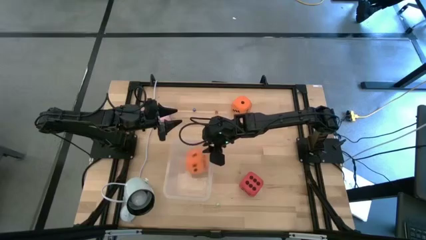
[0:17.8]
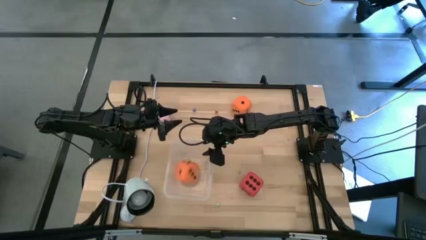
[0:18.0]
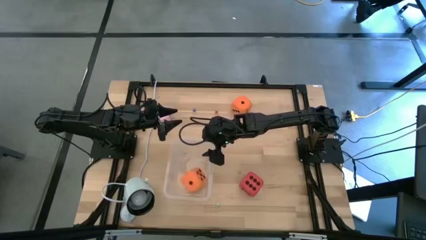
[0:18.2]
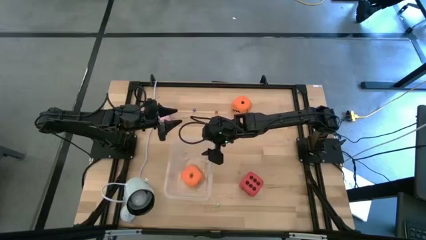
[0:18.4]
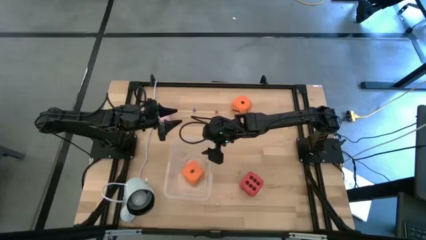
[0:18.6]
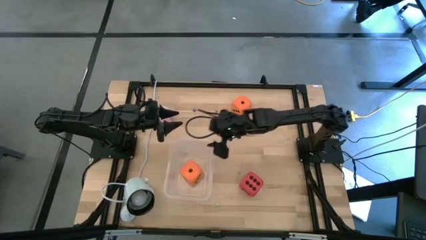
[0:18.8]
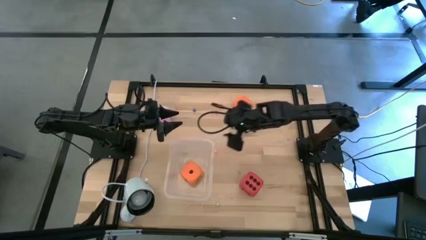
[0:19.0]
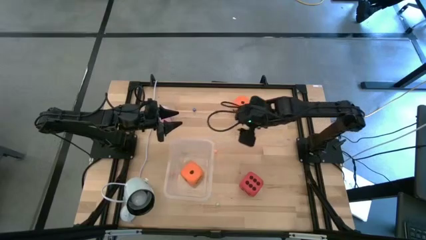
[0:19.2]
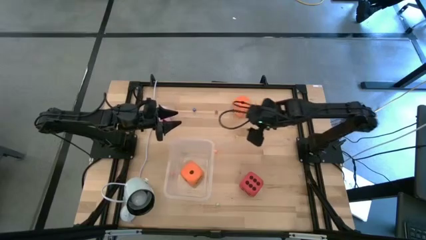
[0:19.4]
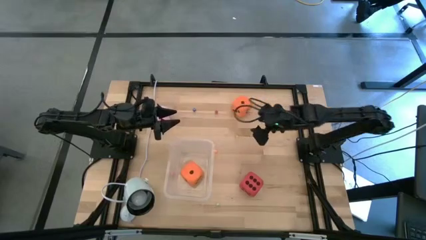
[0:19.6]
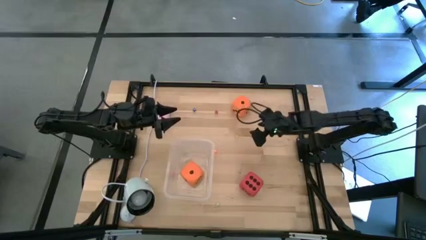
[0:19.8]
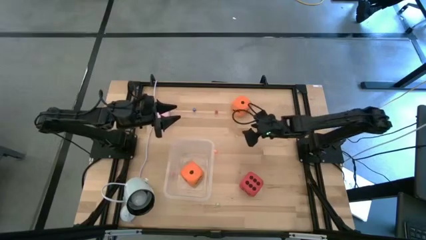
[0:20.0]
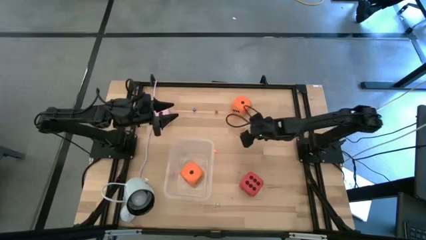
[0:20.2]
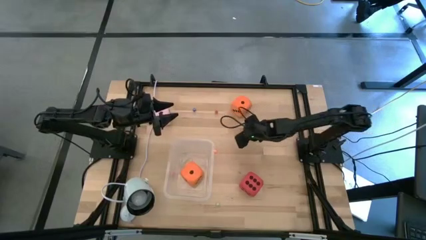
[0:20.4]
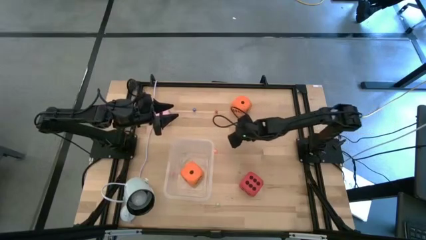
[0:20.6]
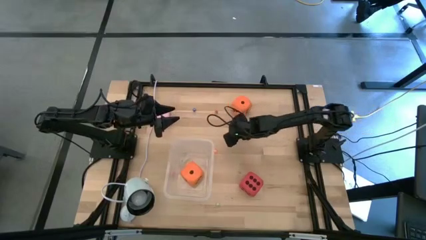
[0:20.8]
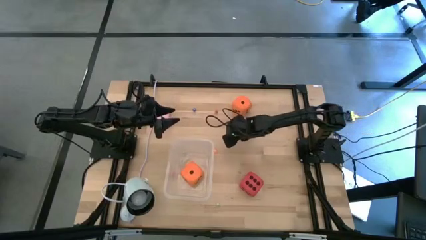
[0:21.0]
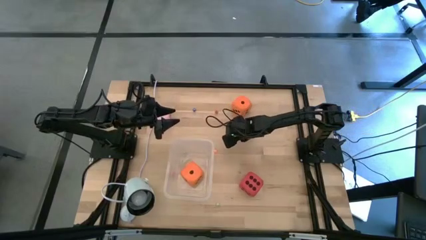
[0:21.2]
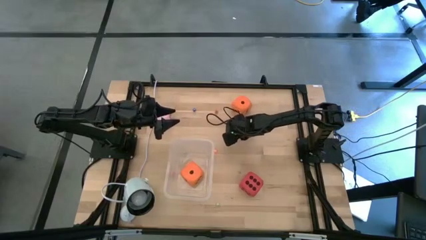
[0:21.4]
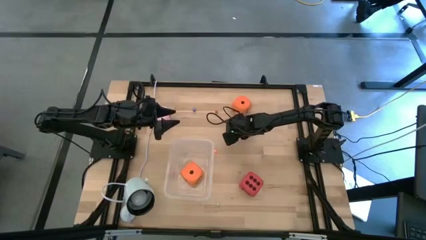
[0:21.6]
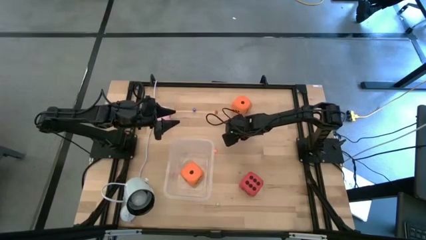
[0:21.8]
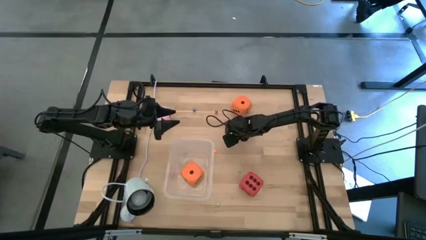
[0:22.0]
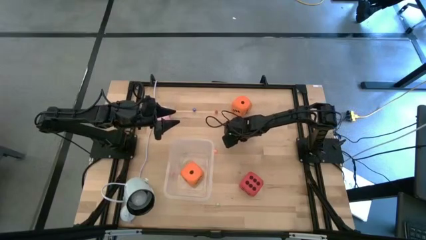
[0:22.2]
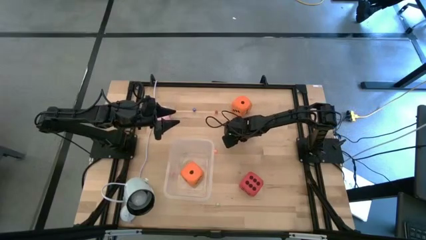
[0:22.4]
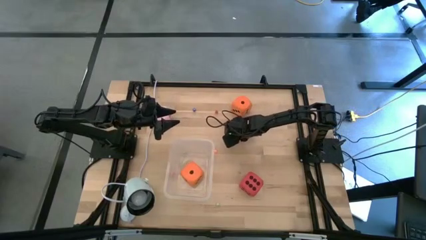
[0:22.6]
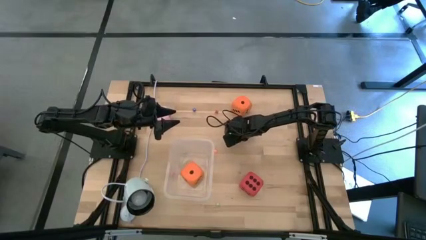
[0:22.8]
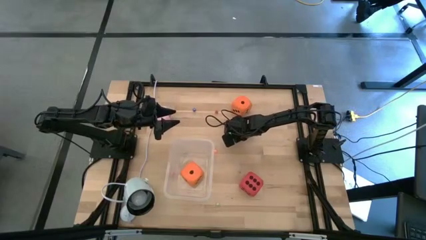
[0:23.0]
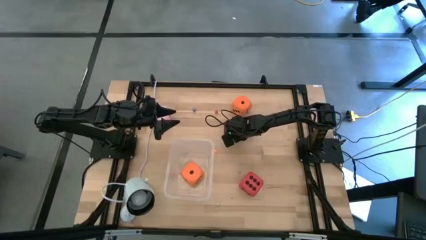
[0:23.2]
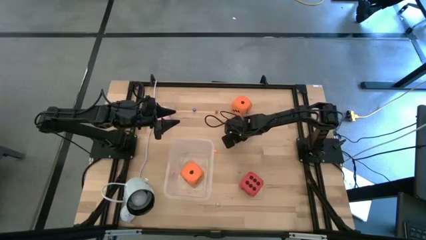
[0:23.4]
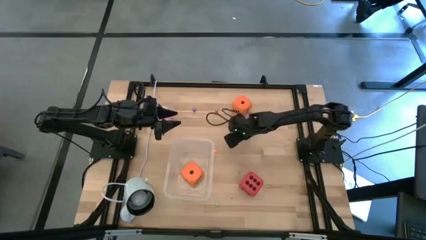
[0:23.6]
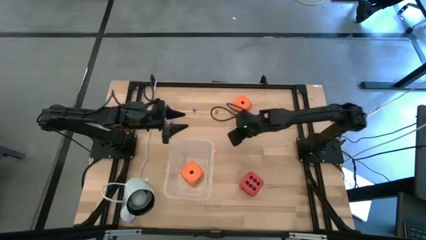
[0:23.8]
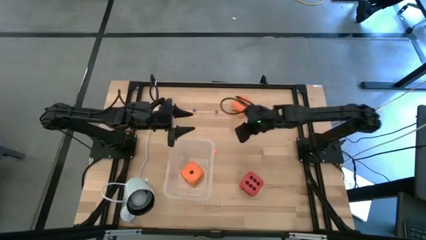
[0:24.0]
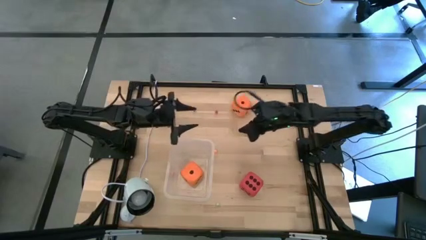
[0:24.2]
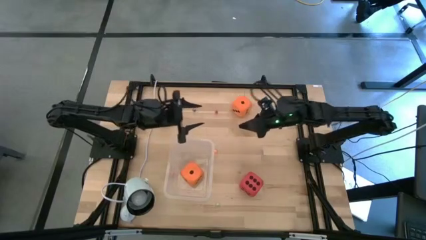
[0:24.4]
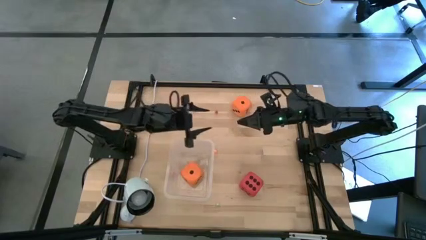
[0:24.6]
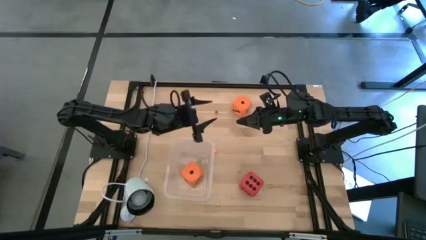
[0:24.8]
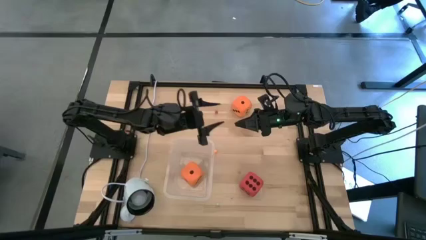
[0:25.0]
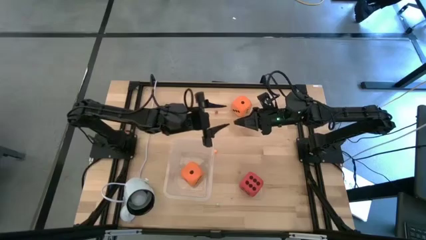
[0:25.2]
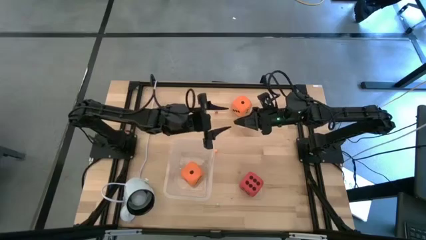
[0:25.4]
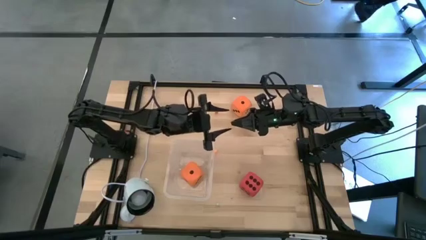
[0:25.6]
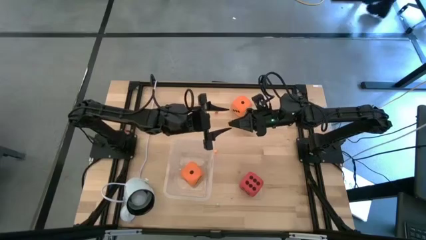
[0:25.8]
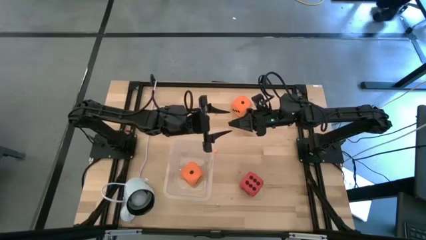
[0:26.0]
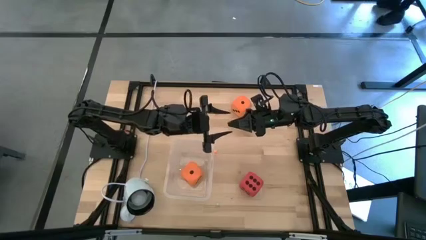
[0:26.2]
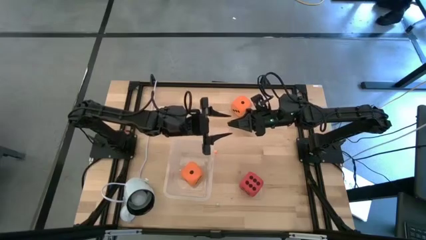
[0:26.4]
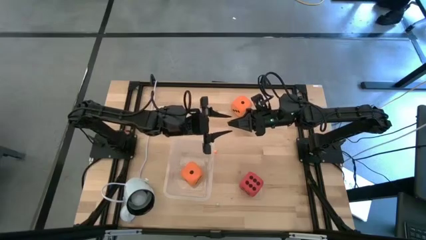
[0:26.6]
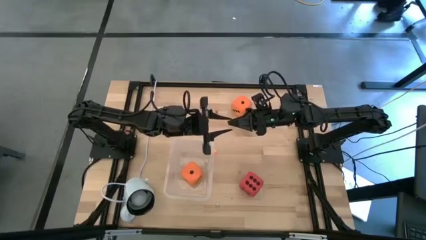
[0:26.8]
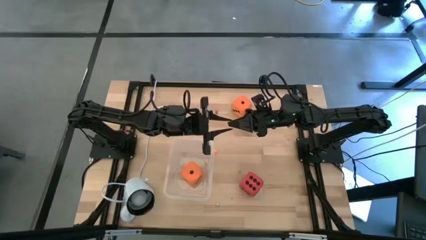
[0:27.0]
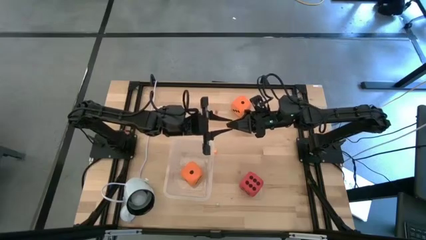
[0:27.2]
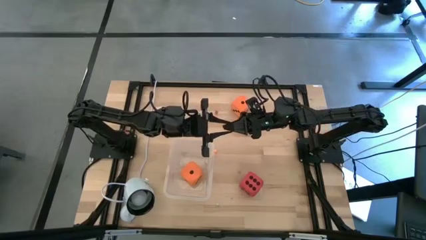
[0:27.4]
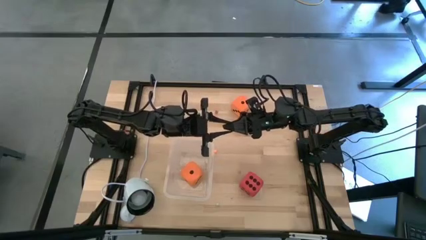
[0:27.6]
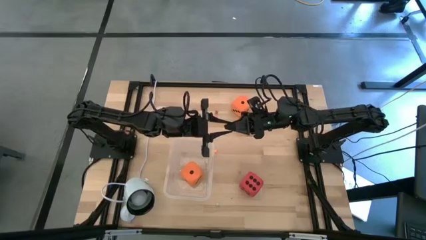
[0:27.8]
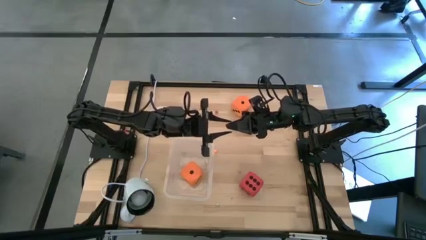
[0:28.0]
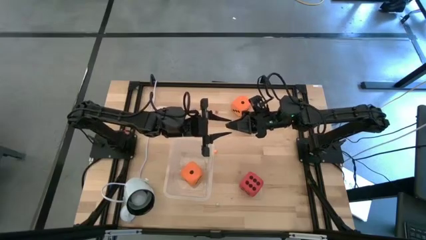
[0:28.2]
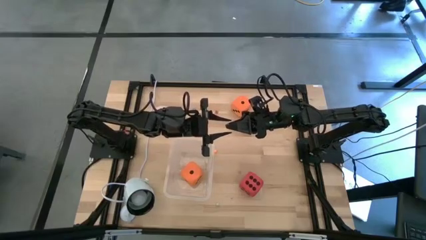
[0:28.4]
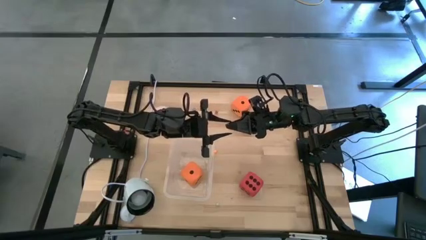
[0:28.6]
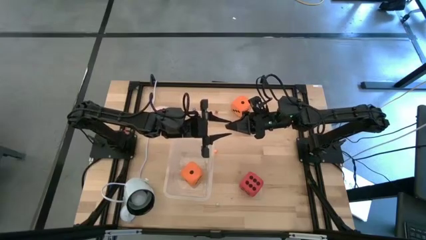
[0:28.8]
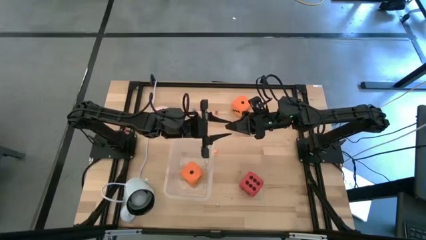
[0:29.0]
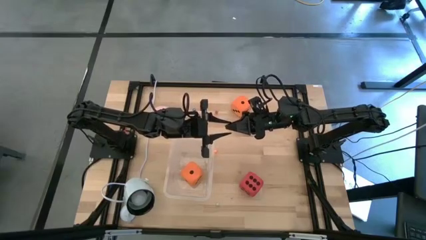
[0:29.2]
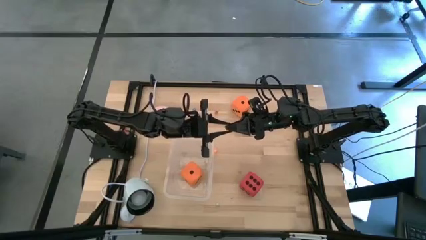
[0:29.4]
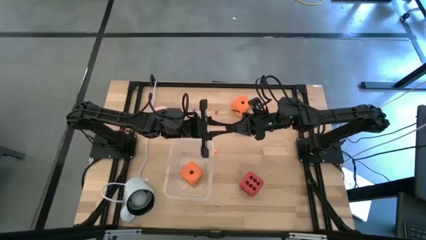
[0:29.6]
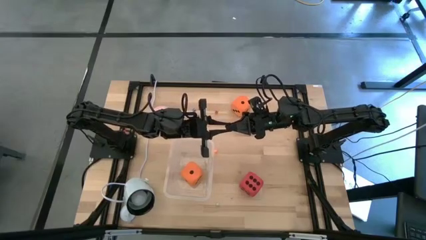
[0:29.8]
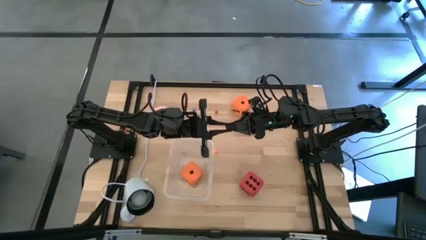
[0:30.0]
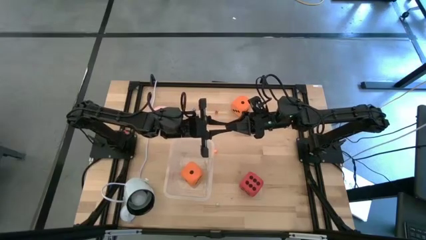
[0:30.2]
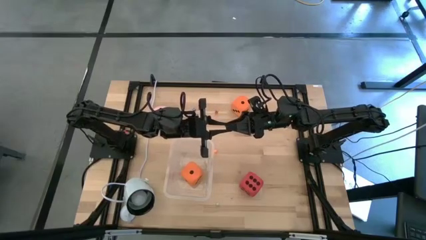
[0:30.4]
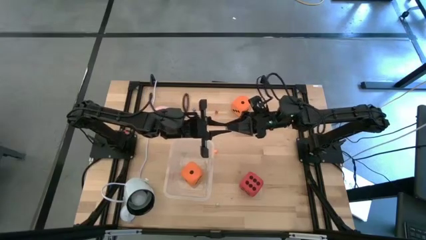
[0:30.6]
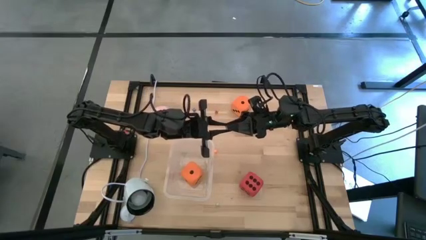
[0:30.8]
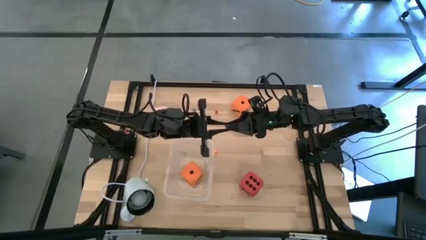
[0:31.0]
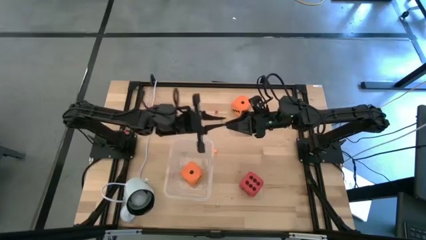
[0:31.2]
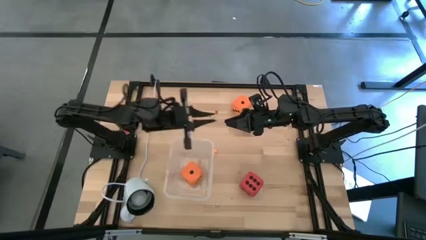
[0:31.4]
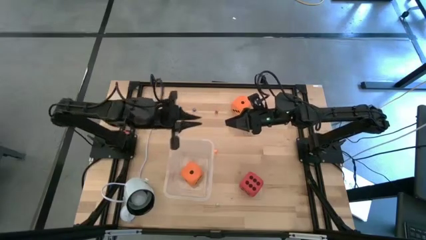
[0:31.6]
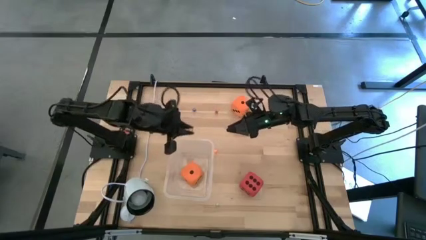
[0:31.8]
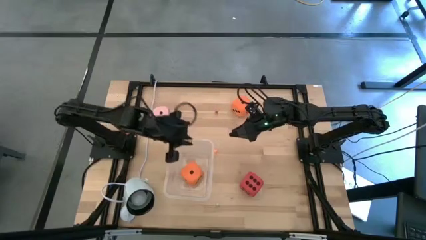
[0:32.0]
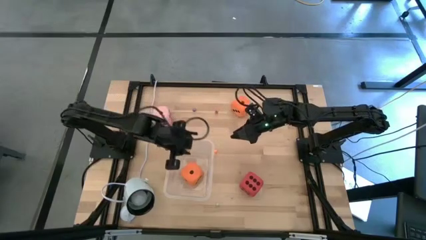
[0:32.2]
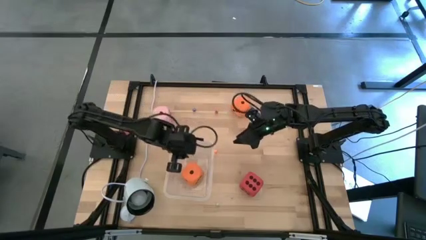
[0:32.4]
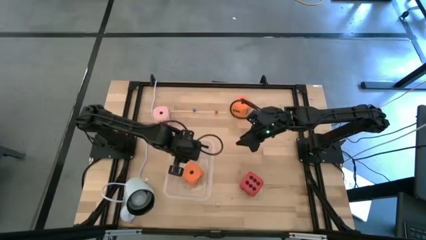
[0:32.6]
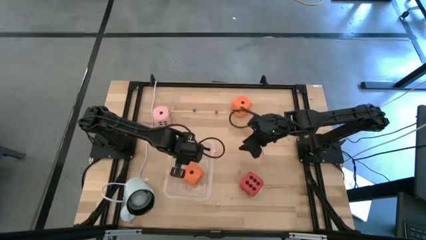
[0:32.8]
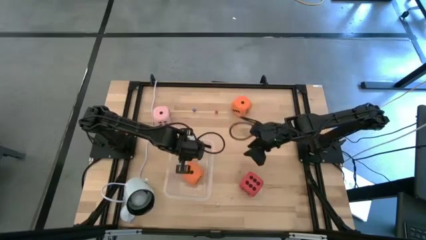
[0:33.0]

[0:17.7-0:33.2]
Task: Pick & Place Dice
Put the top small yellow die on the bin
